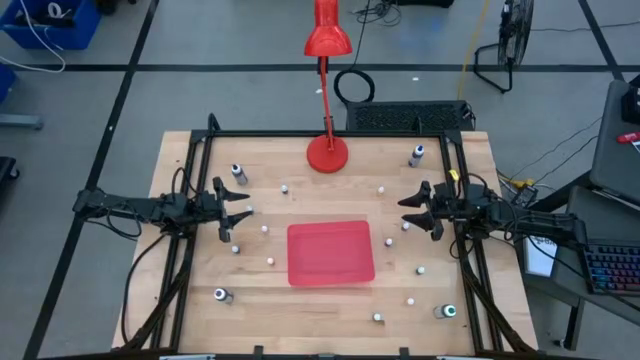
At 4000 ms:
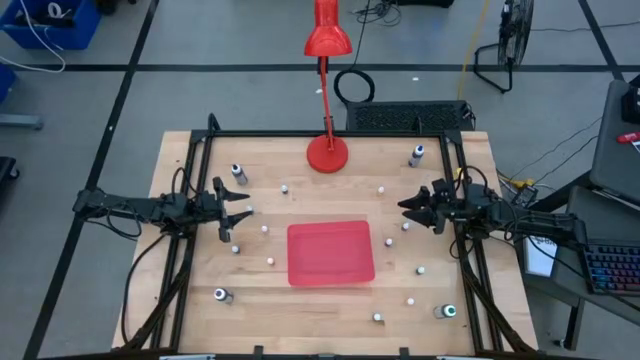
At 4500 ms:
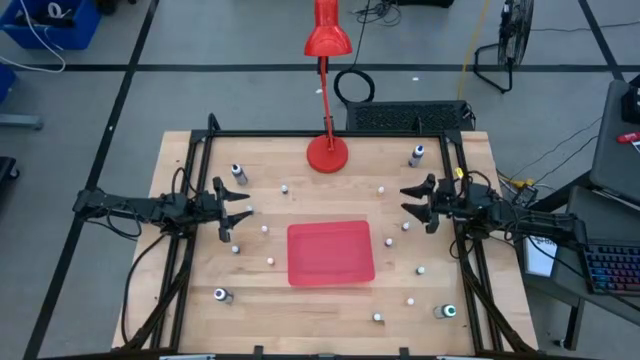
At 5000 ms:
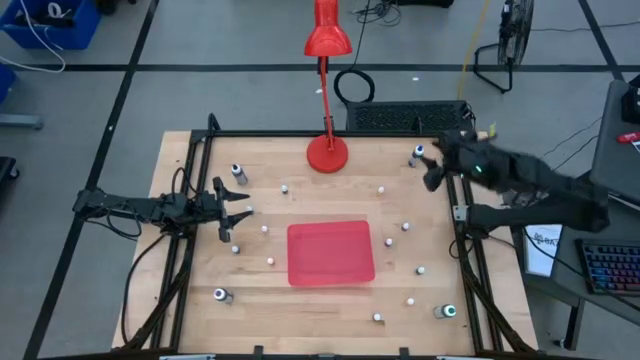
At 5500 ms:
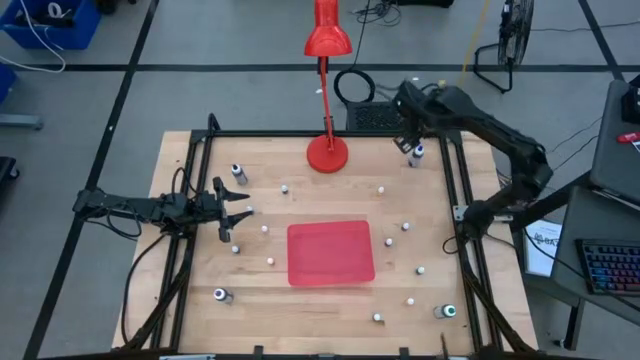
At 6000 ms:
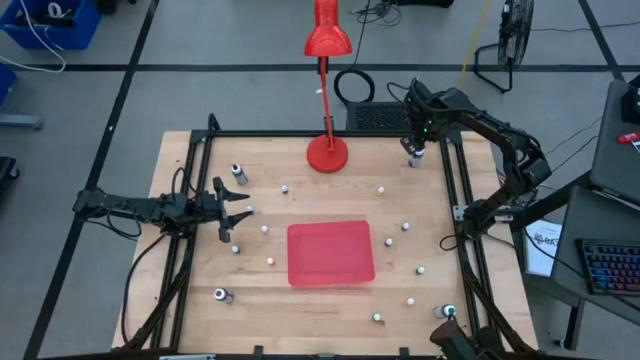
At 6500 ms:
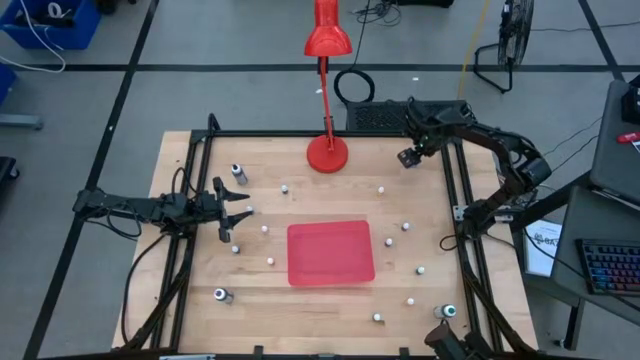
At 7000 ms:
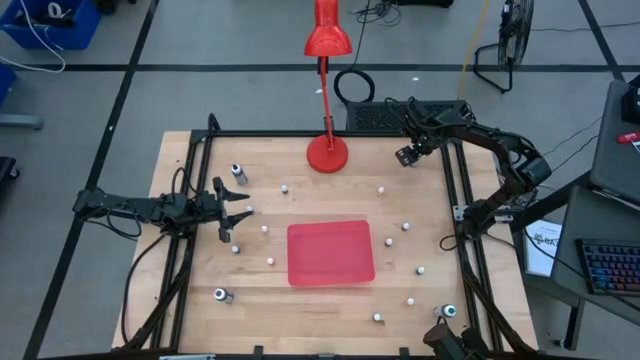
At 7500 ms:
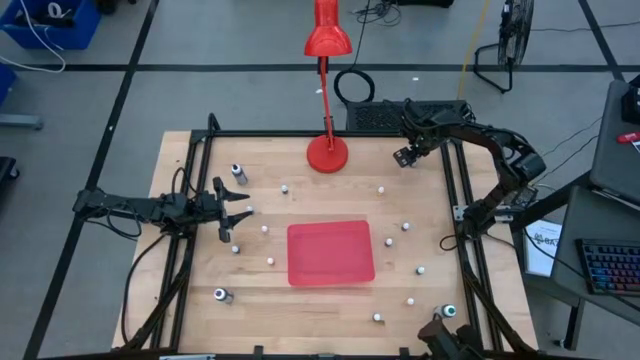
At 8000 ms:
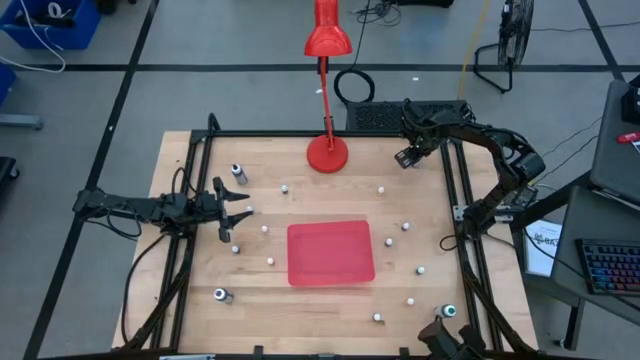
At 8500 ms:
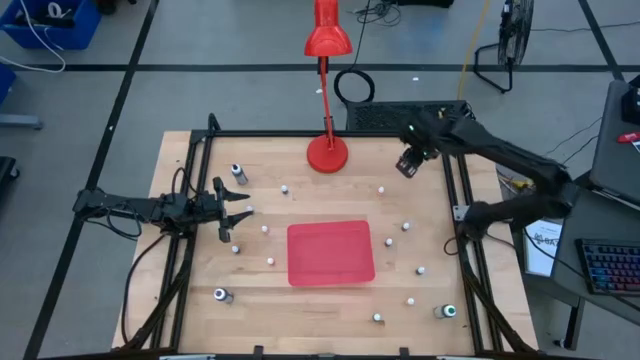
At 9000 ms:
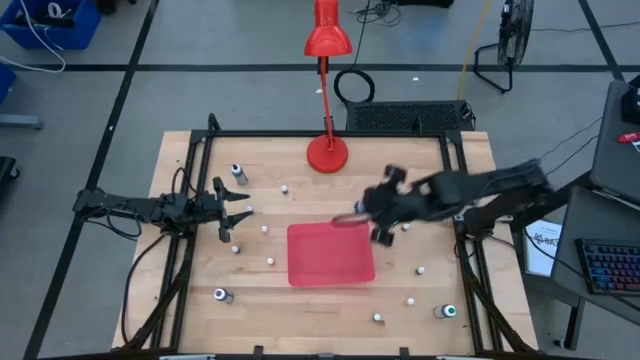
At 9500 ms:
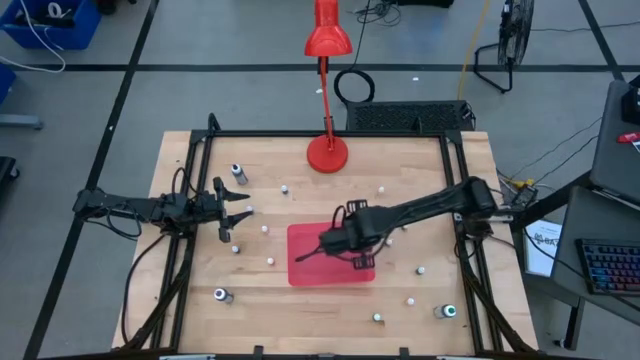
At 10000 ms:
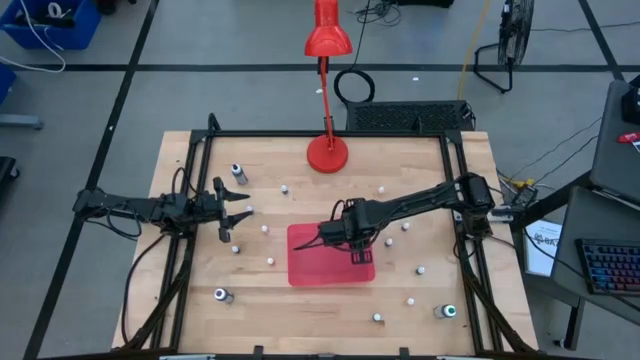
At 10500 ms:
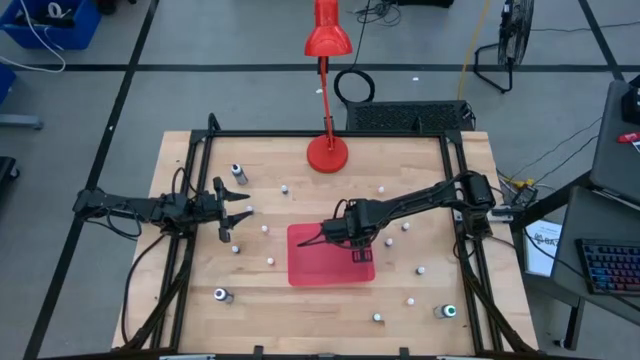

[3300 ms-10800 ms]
Task: Pick & Place food coloring
Put the large blue food coloring bottle into the pink bin

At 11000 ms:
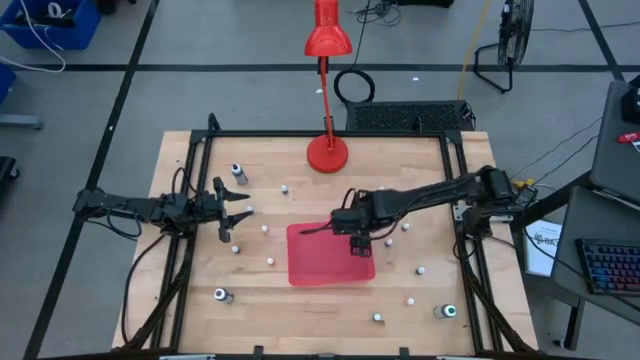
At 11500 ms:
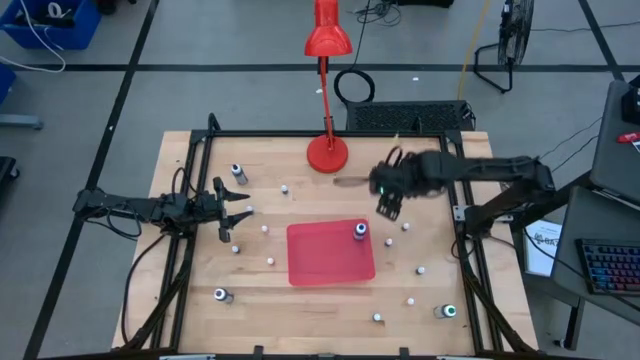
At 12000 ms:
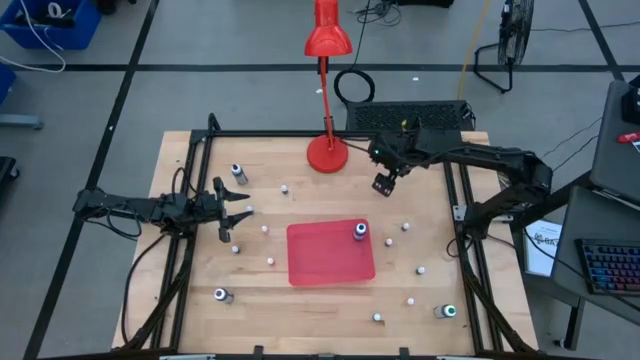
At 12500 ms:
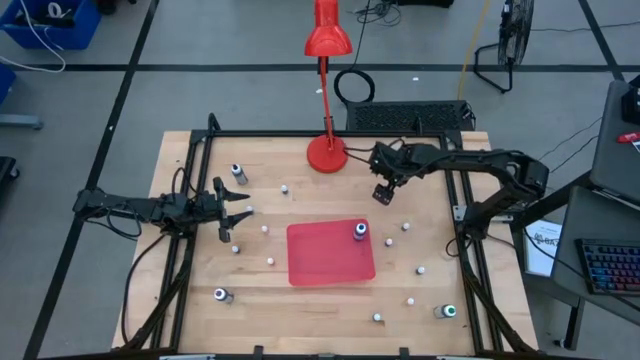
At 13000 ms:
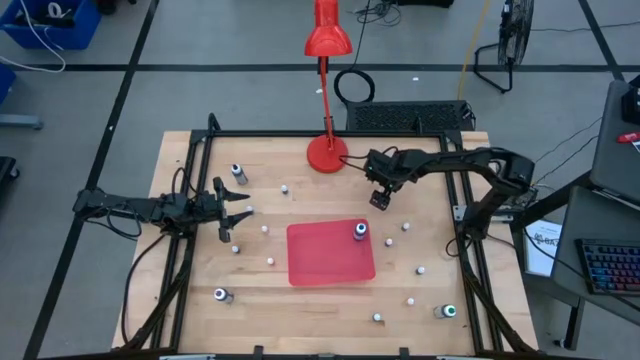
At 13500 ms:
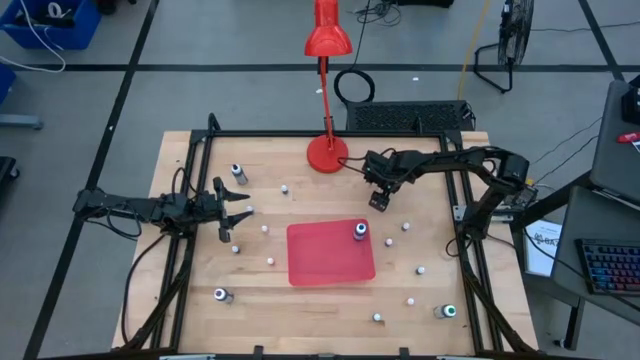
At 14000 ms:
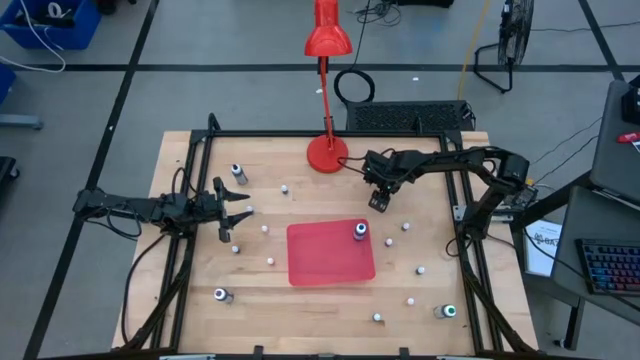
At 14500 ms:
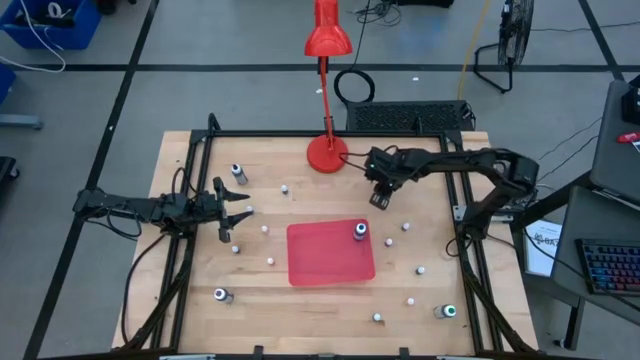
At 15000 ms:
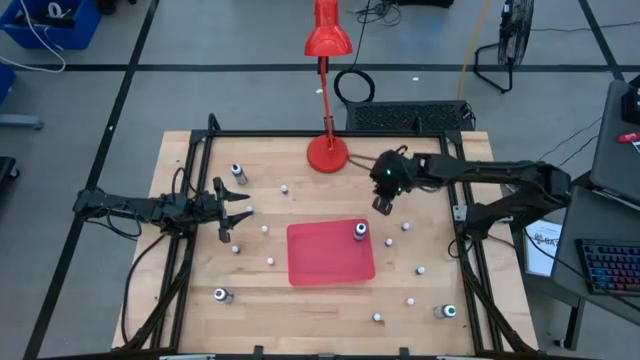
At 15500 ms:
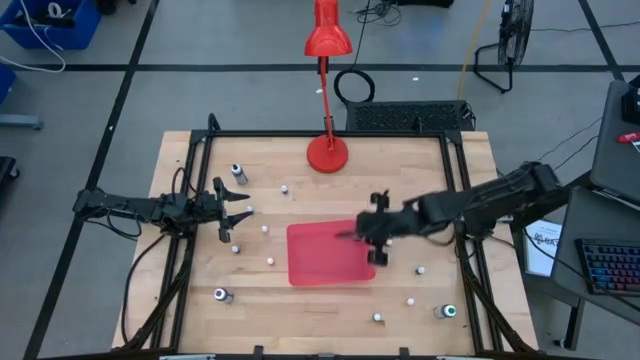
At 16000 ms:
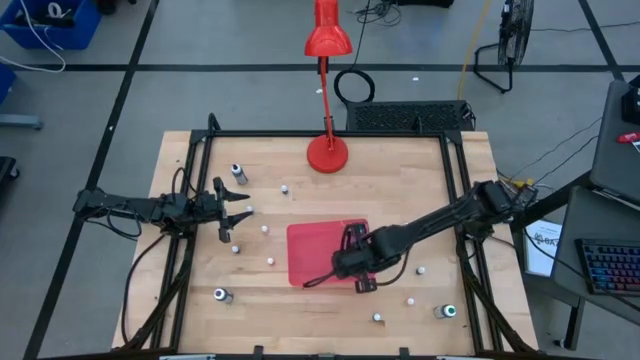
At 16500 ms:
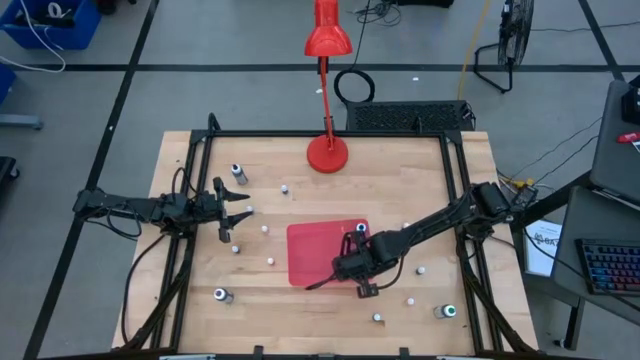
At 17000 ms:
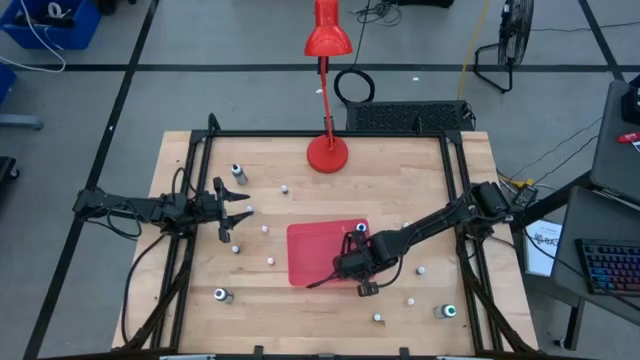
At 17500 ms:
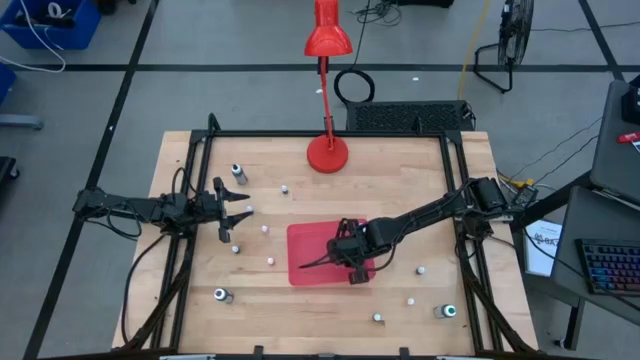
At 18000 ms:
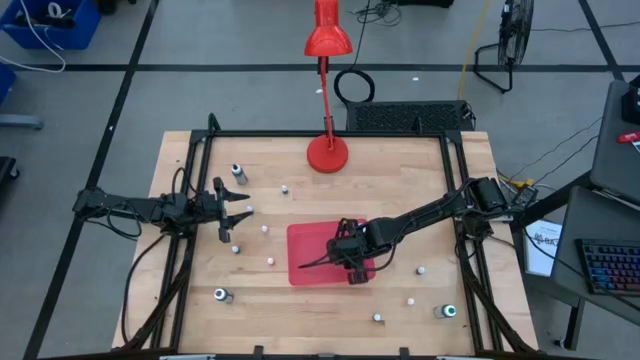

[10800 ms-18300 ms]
Put the small orange food coloring bottle into the pink bin

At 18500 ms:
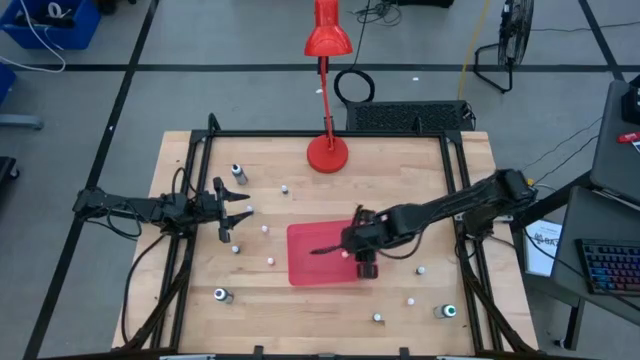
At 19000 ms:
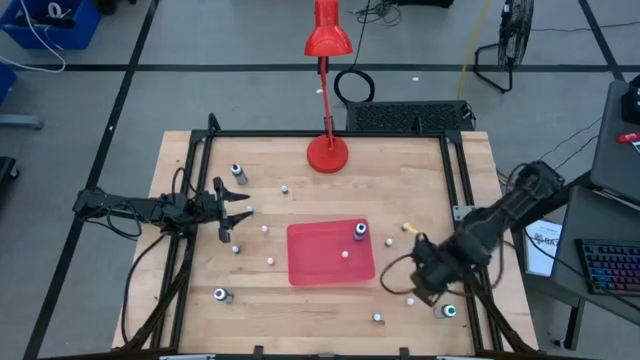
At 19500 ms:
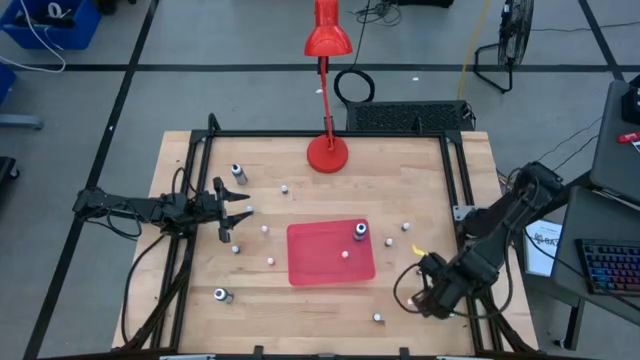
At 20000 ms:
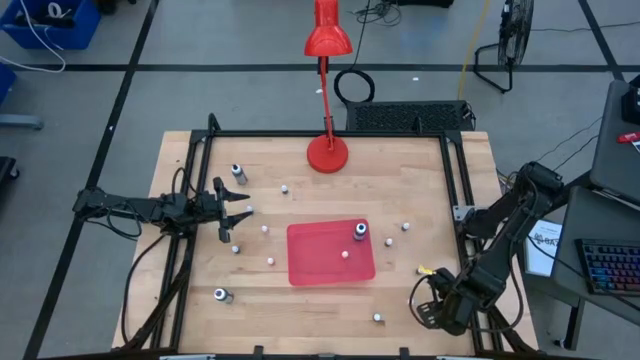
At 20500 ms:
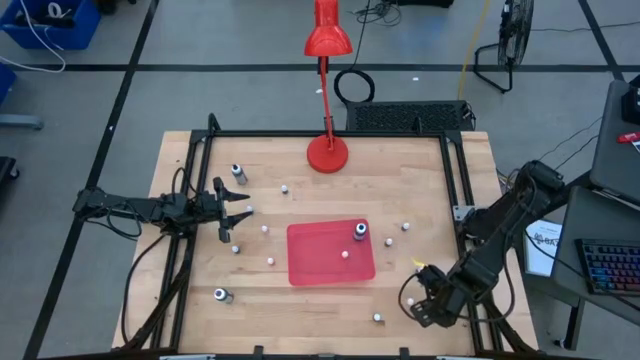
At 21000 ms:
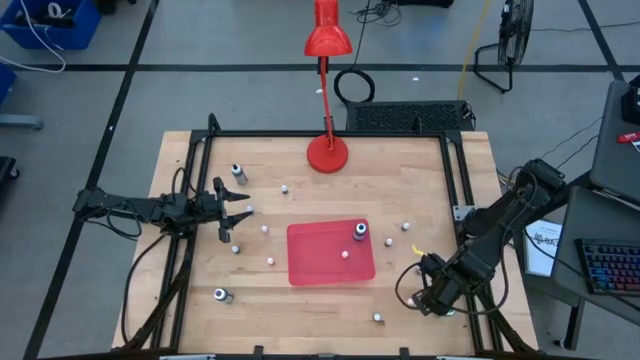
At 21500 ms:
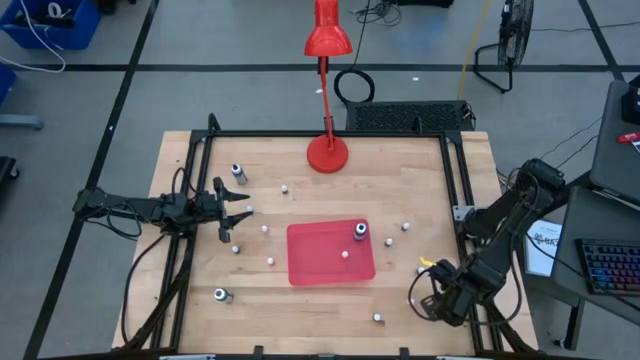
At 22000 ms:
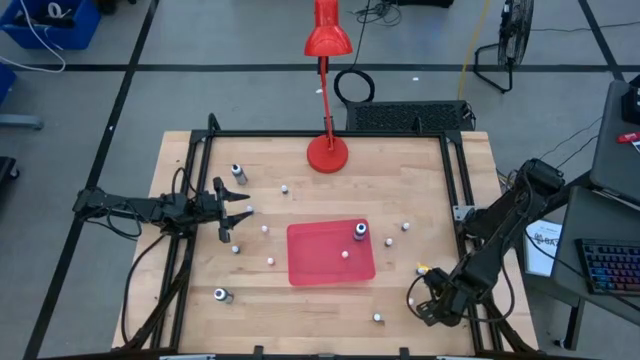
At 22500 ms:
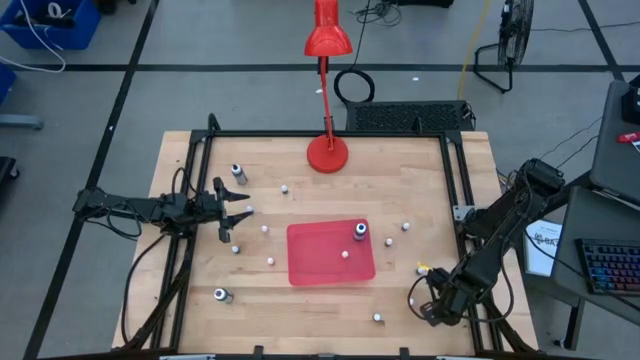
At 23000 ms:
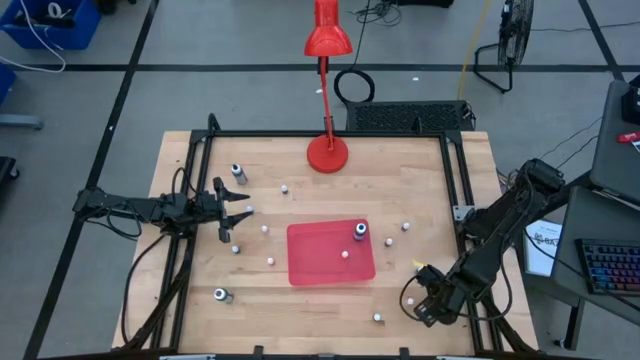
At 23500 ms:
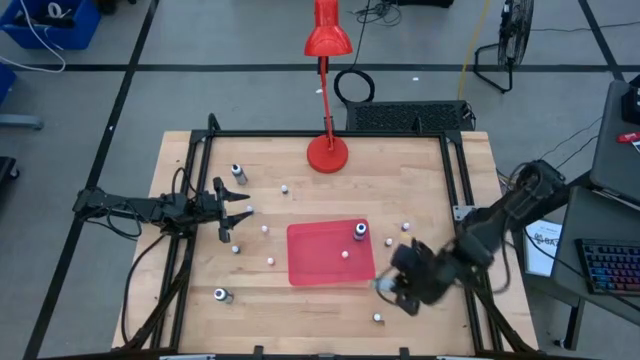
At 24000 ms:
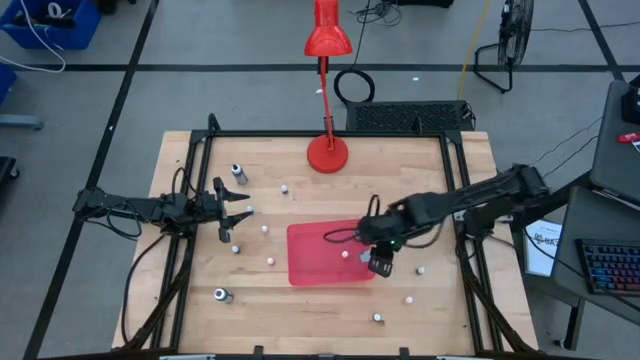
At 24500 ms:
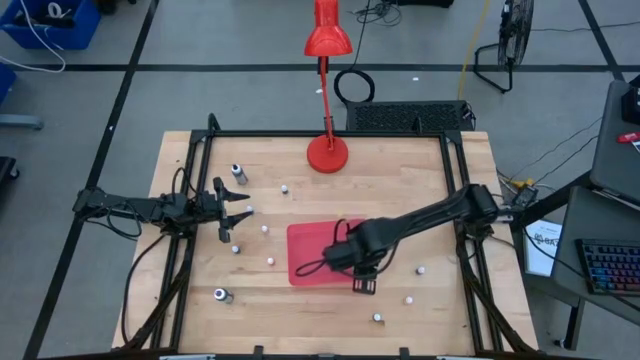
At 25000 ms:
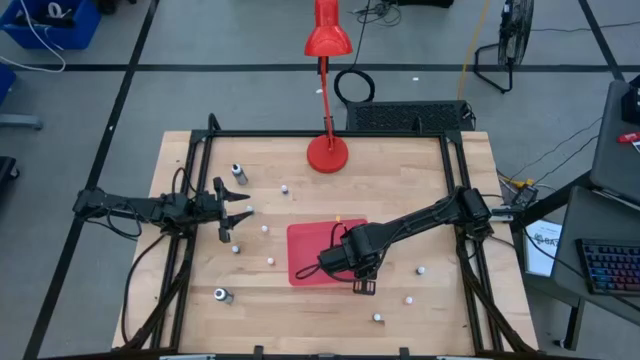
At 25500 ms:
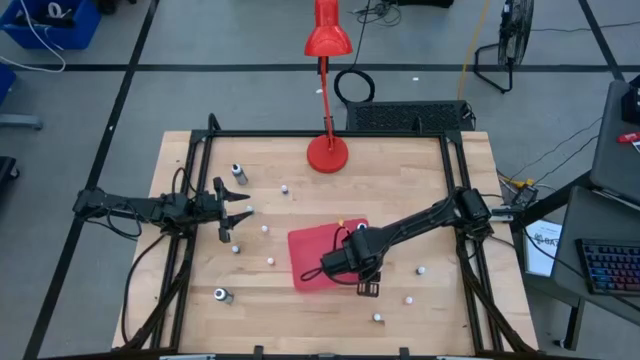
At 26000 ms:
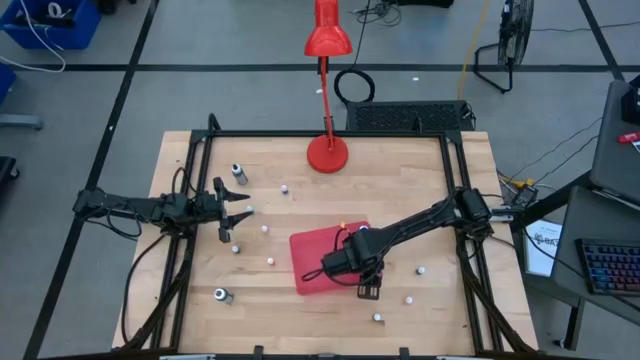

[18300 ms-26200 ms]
Put the large green food coloring bottle into the pink bin
